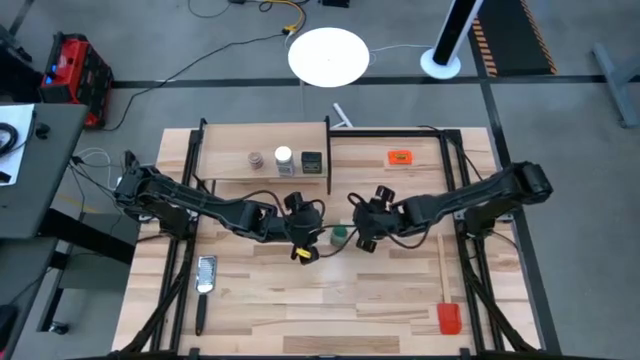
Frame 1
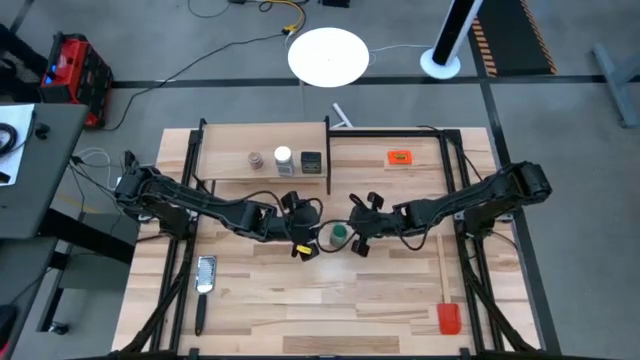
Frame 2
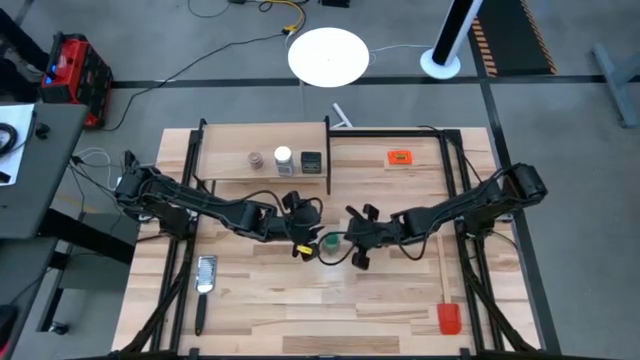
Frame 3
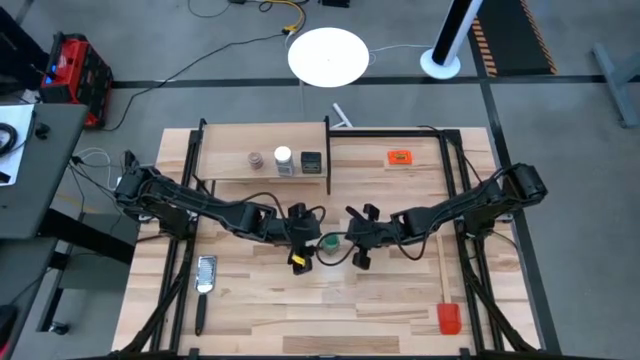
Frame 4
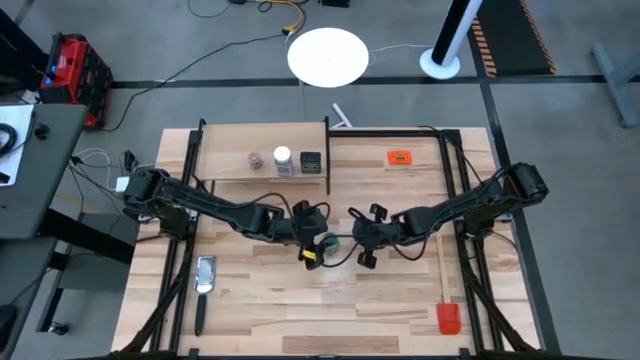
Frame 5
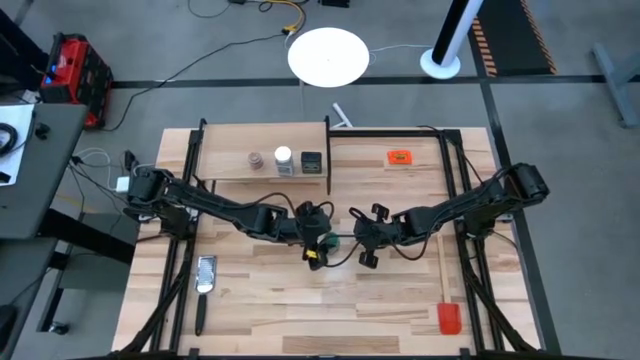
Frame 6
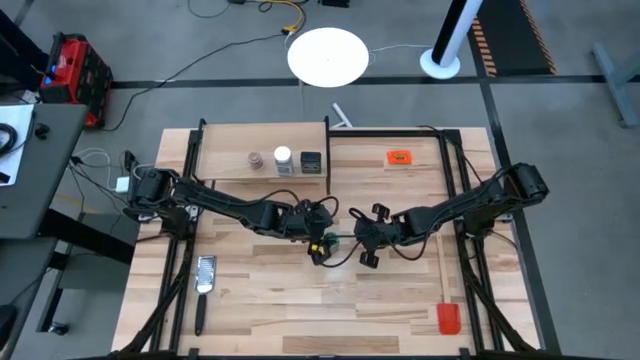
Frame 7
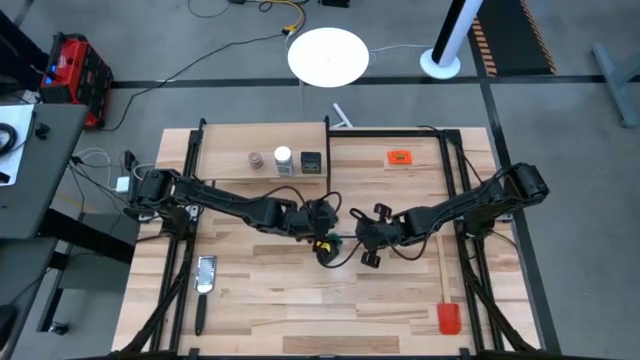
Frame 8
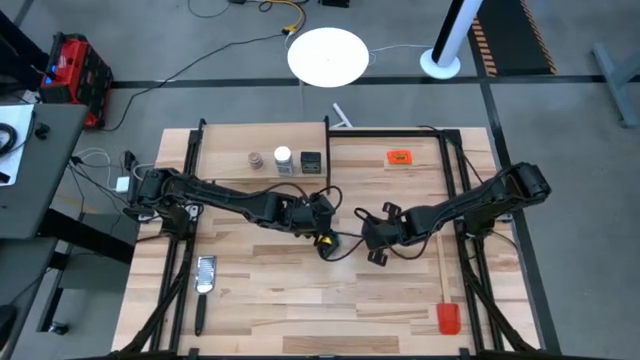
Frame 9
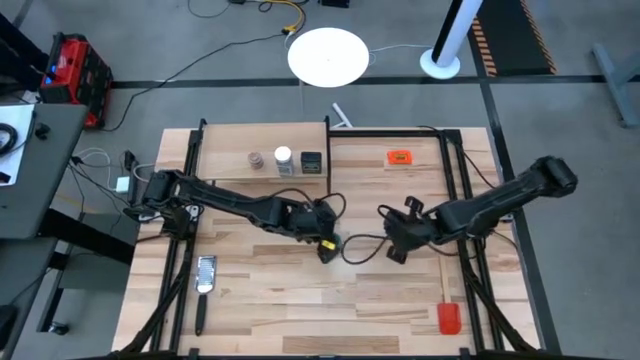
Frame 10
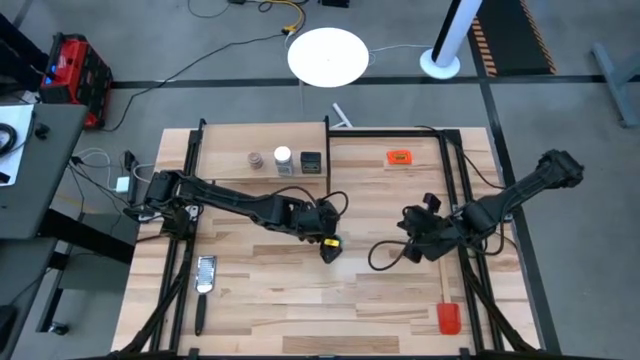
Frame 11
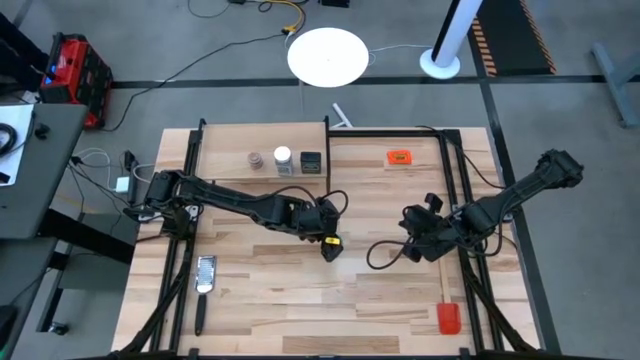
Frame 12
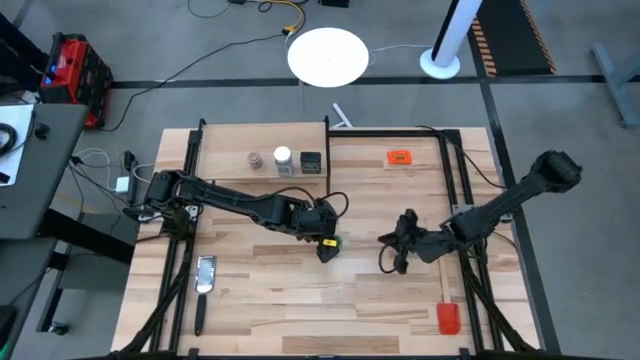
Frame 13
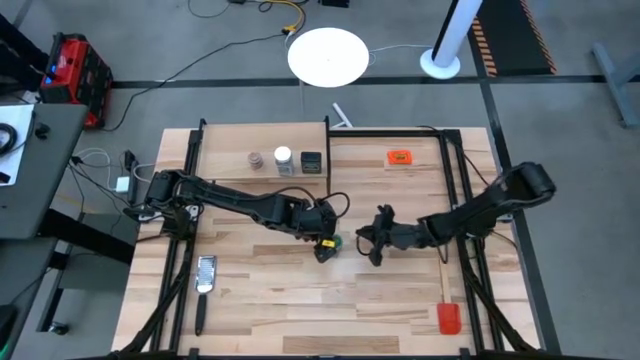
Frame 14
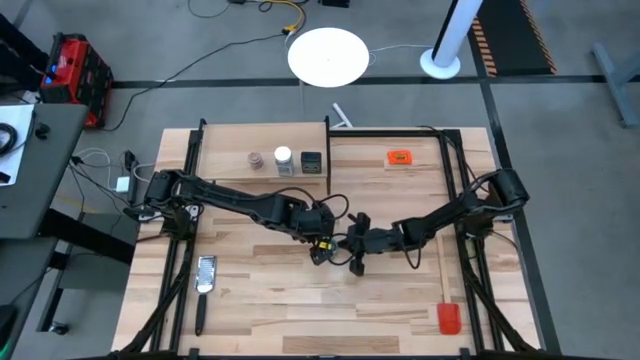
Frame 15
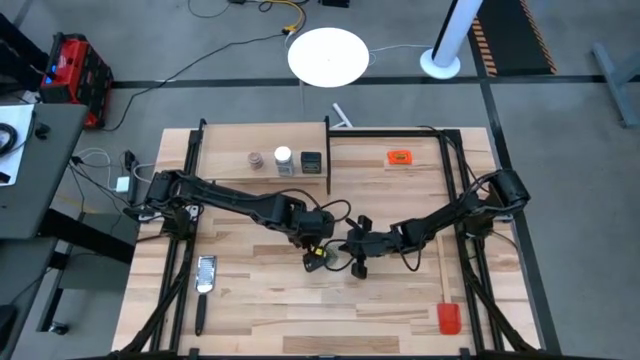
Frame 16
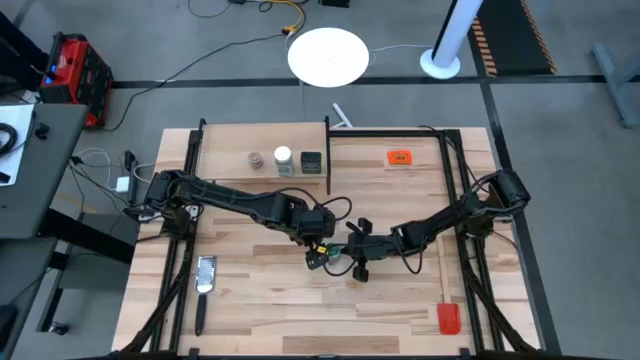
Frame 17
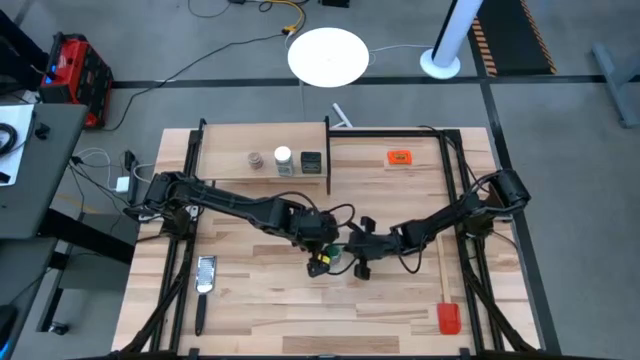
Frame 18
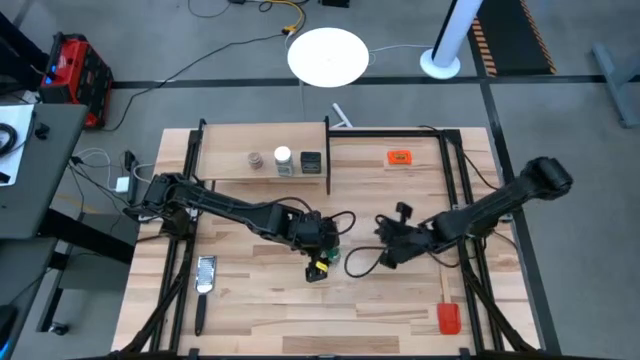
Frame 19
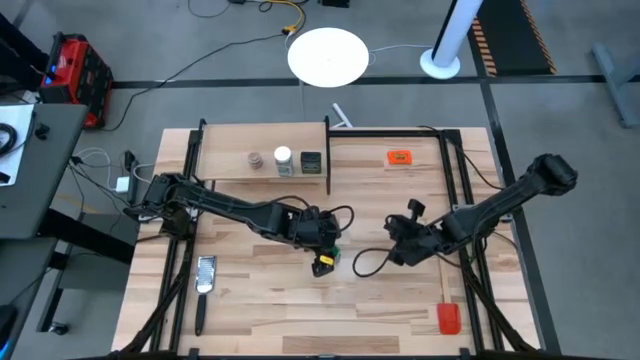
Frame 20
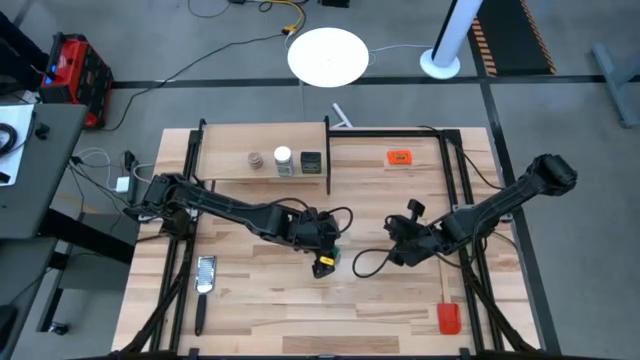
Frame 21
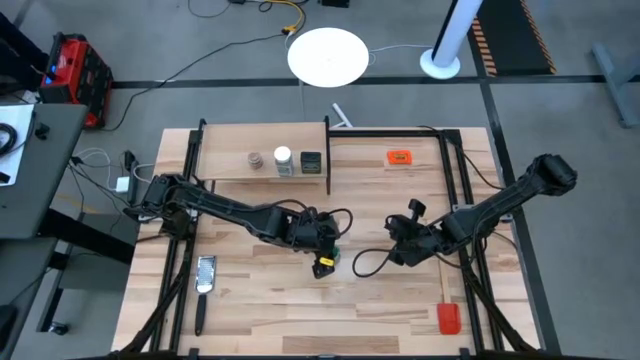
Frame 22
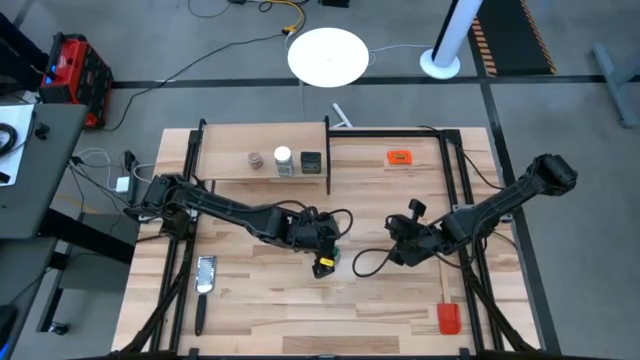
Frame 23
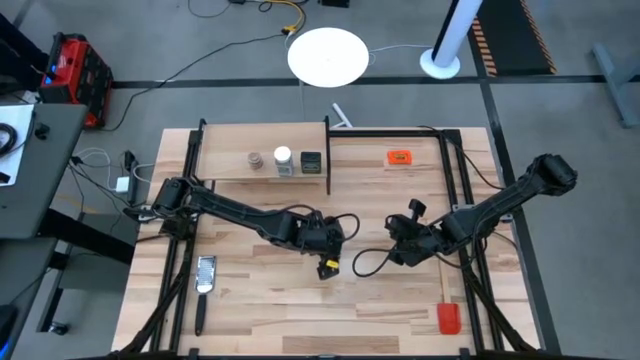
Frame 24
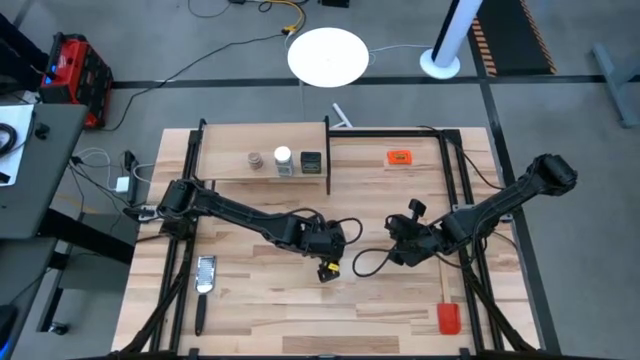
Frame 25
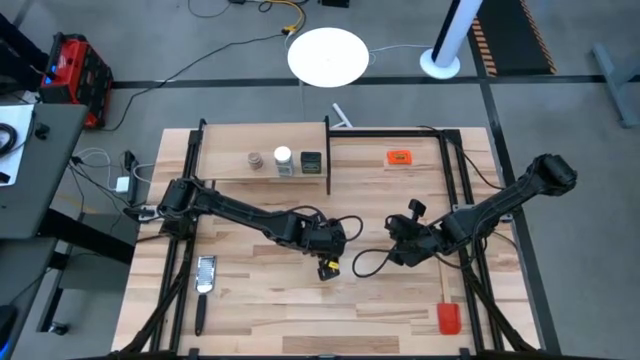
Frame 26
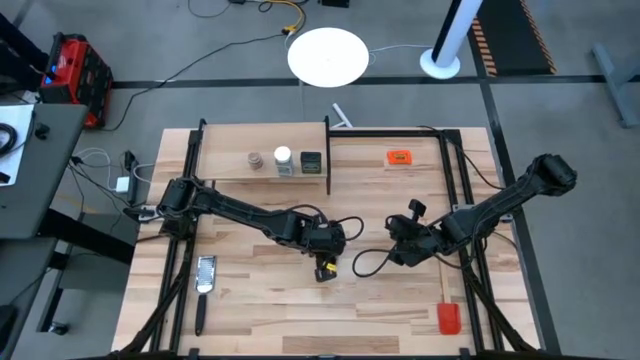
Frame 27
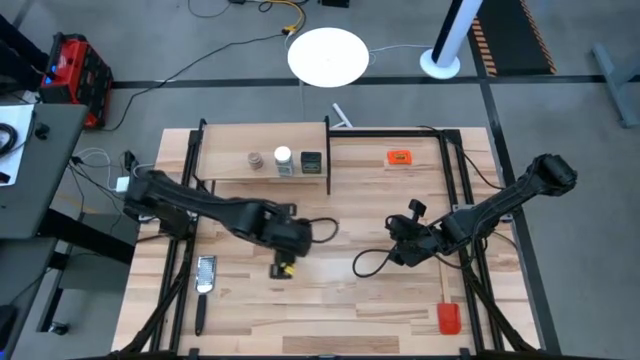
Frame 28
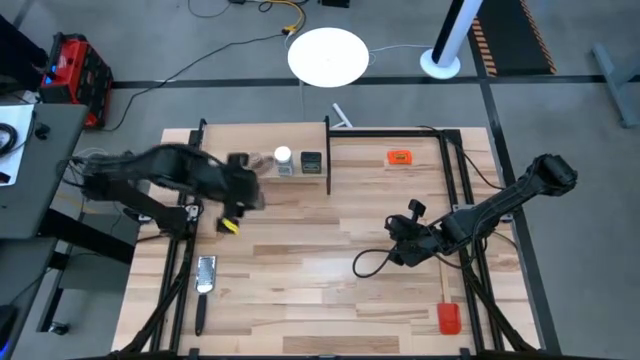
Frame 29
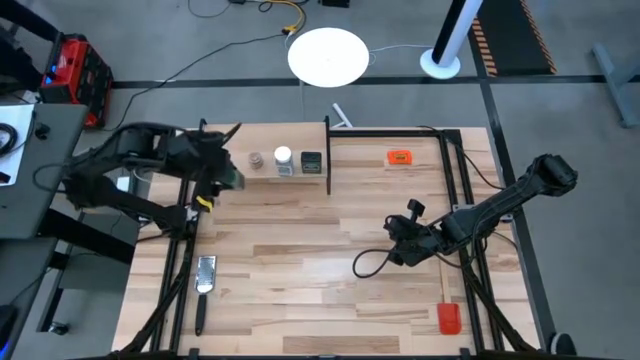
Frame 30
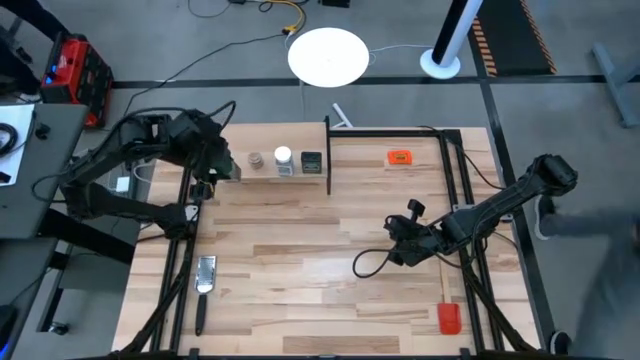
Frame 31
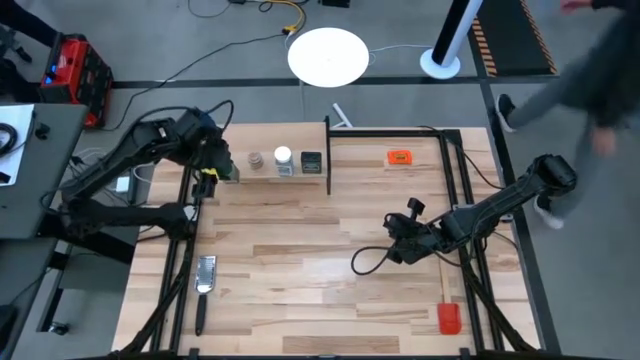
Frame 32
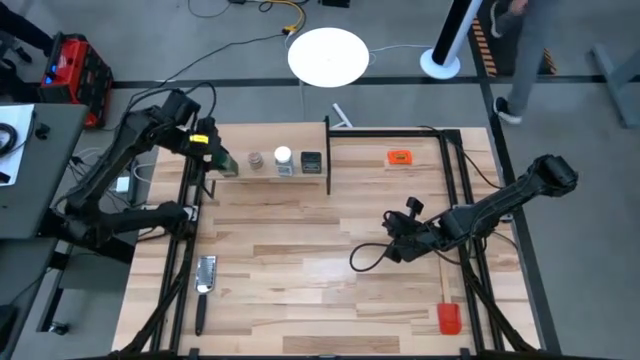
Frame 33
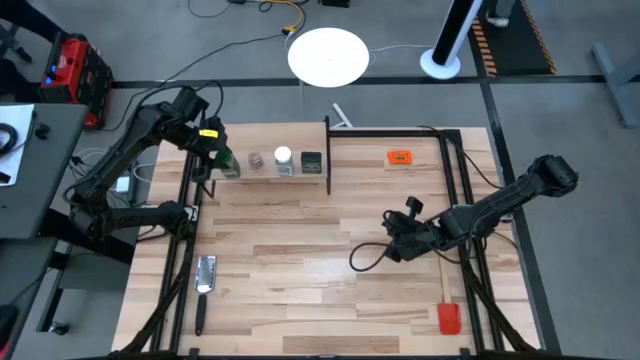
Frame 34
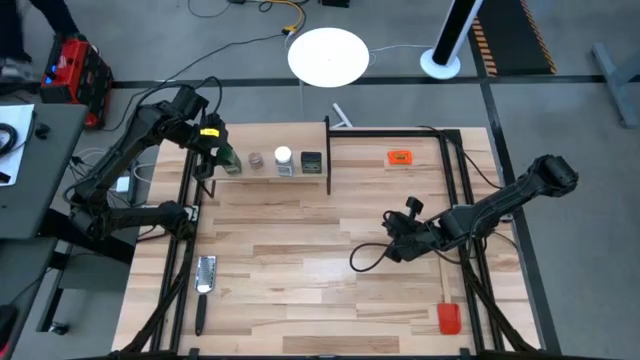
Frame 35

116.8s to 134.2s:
Task: Shelf spices
Remove the green seasoning bottle from the shelf

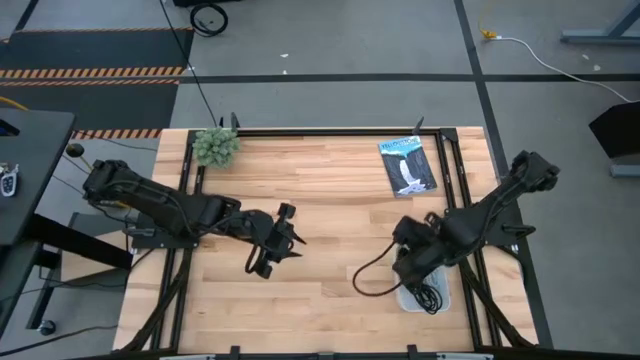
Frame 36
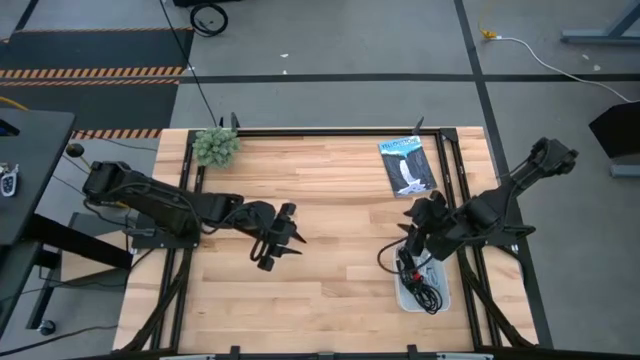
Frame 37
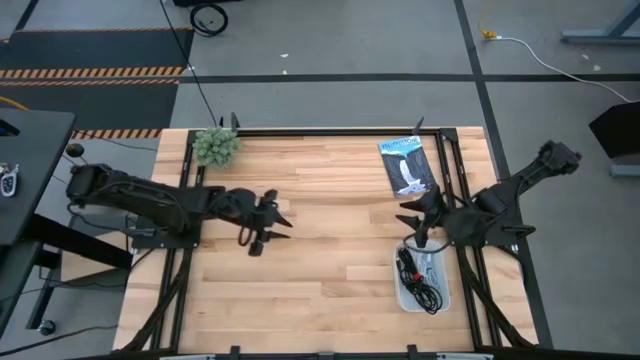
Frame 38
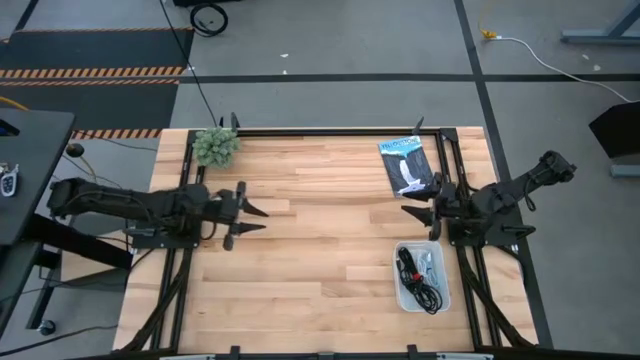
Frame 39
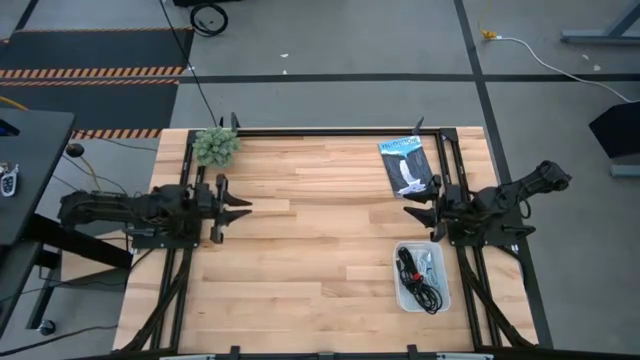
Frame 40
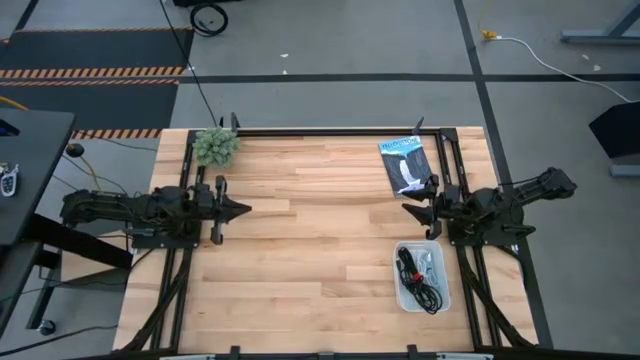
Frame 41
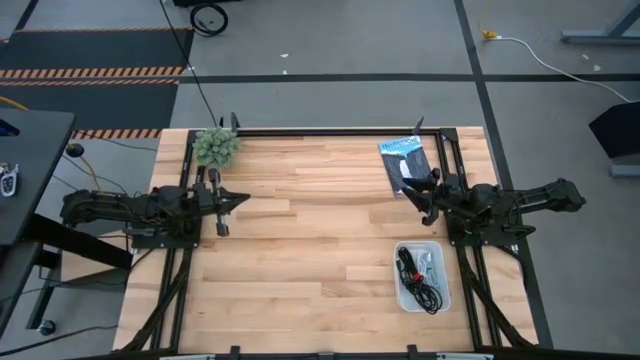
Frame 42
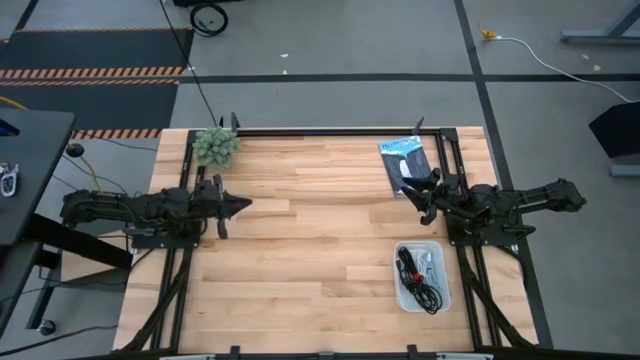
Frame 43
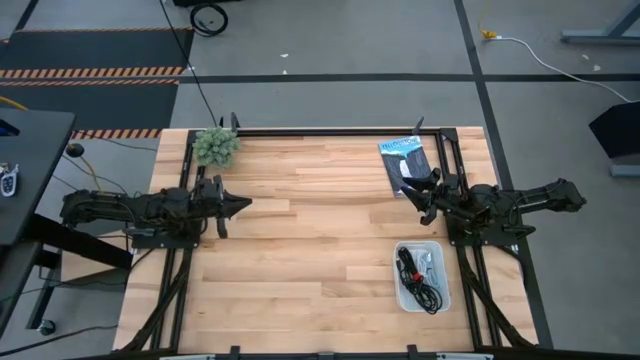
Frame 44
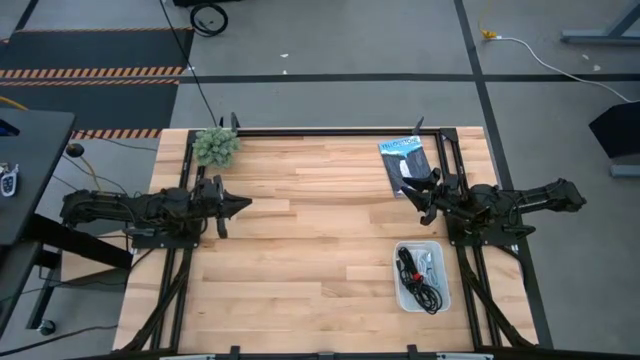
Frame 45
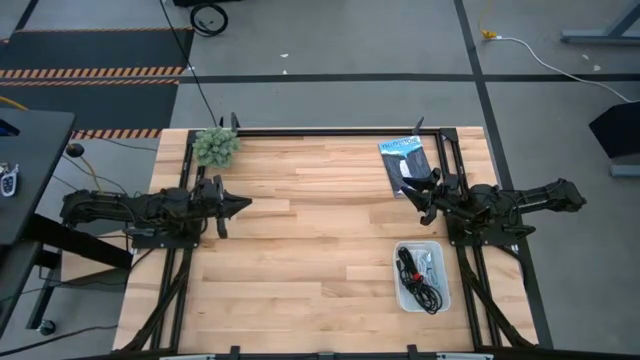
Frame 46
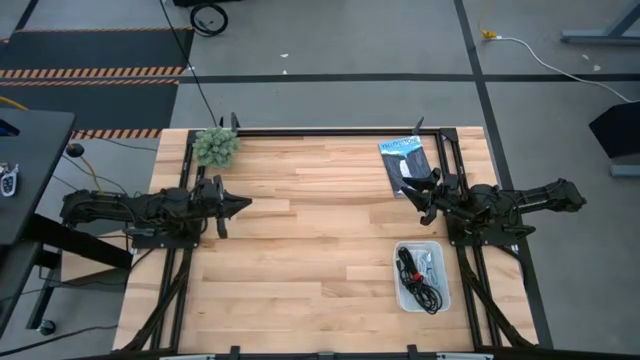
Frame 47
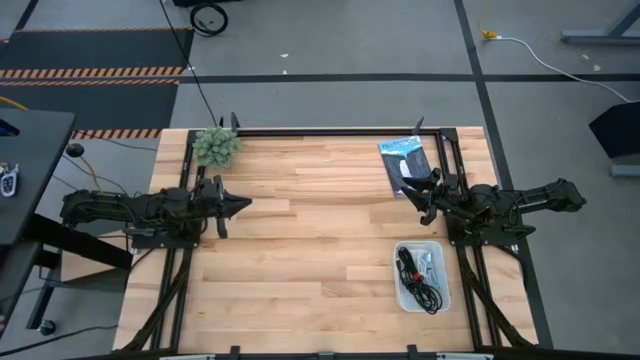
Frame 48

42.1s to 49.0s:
Task: Pick and place USB-C Cables
Return to Home Position
